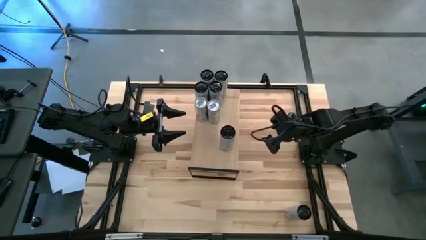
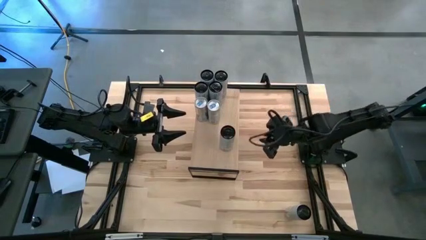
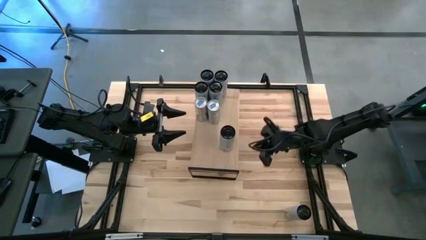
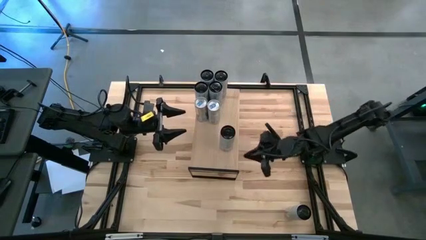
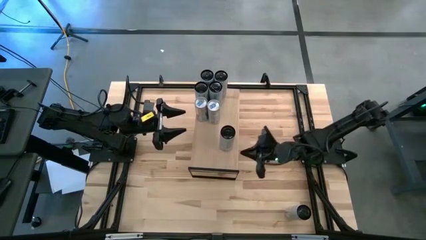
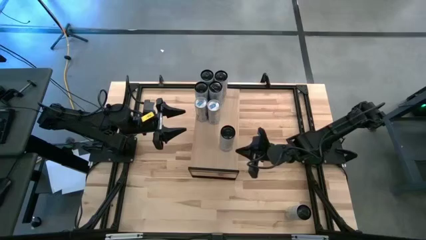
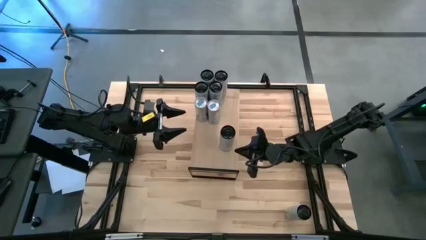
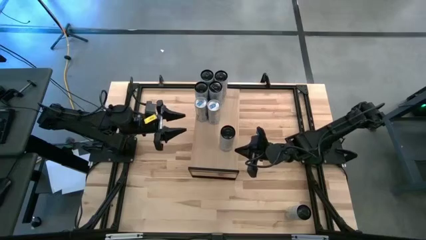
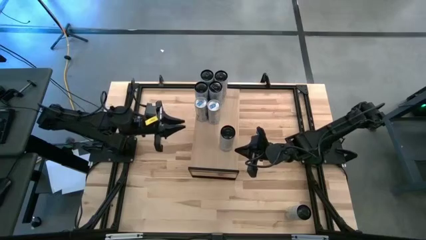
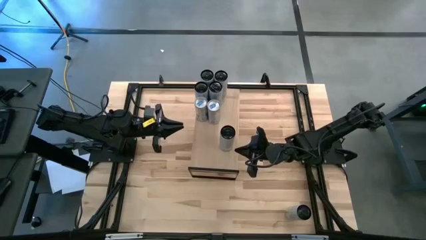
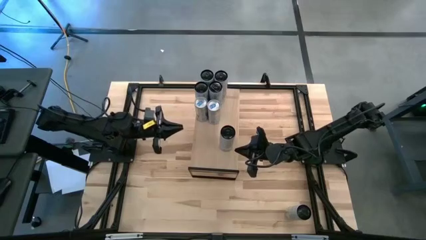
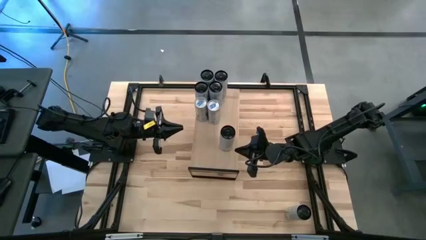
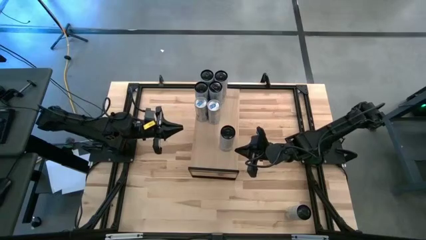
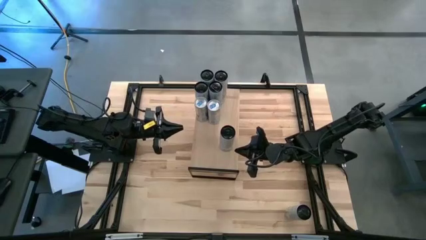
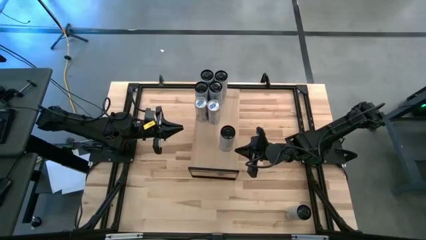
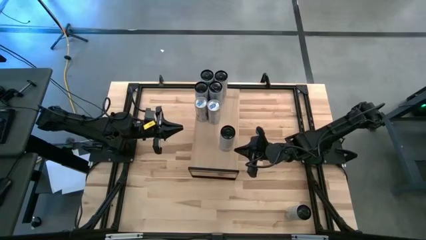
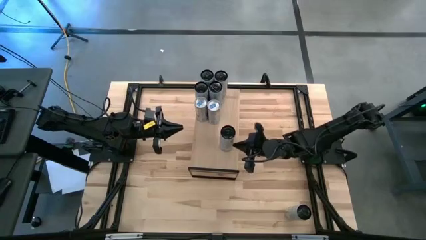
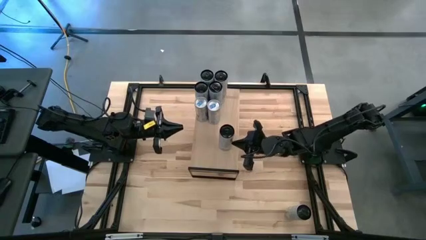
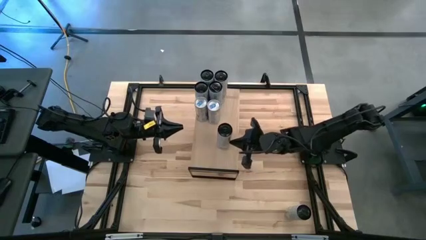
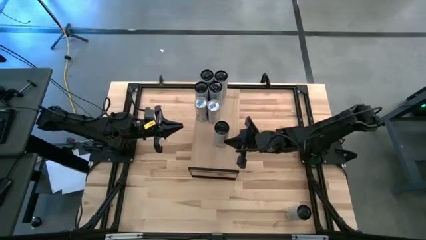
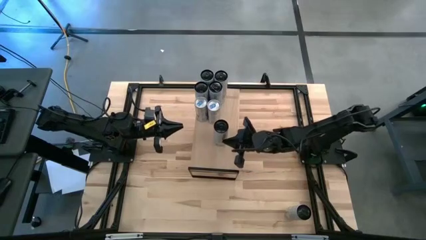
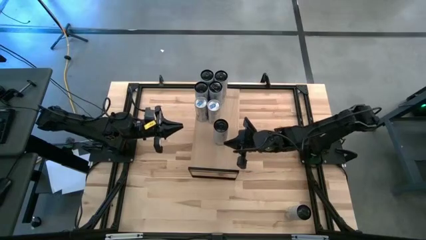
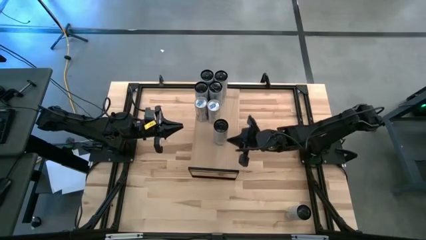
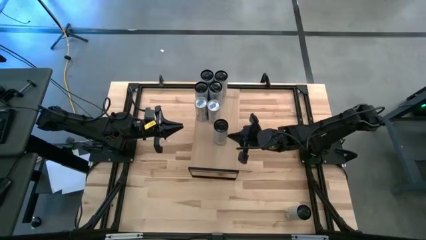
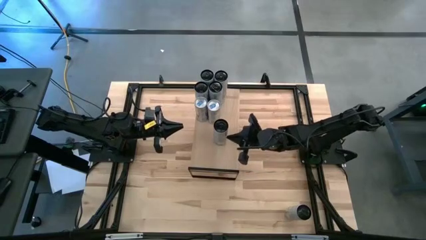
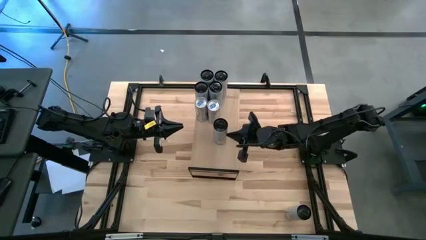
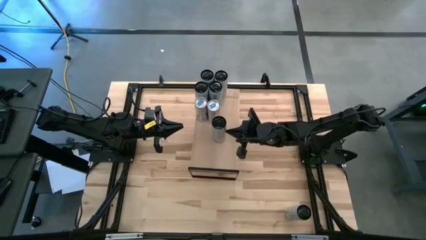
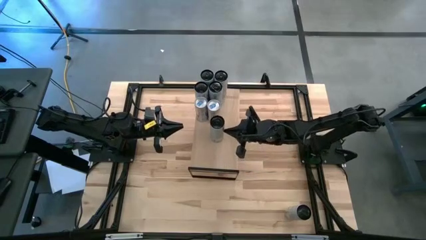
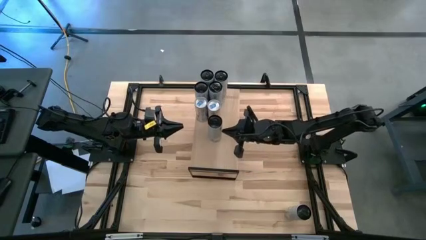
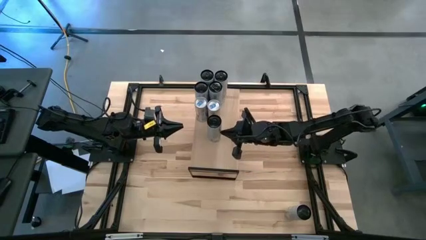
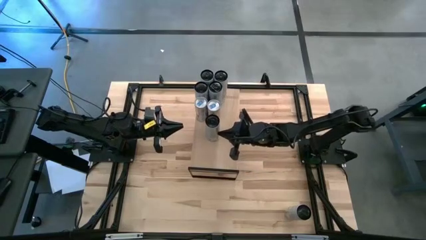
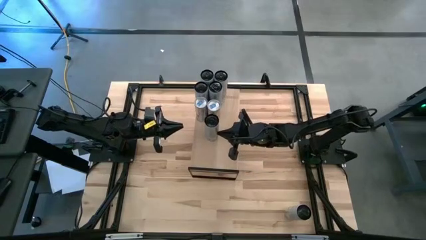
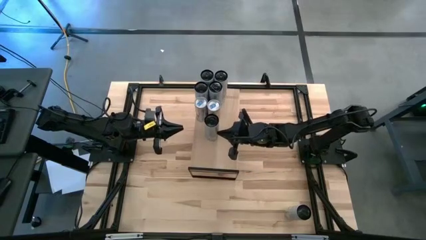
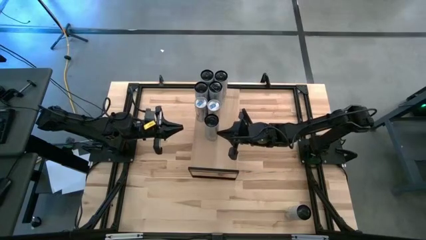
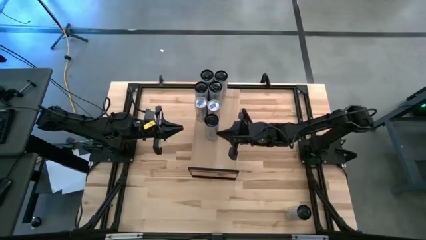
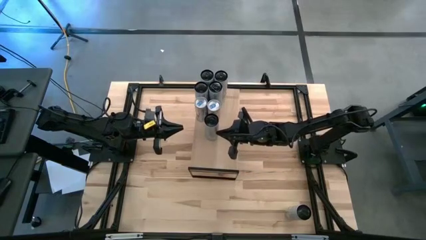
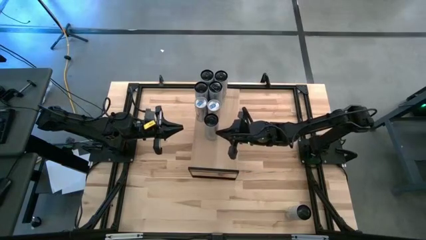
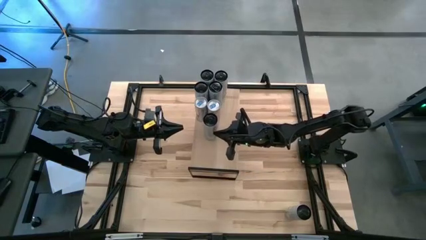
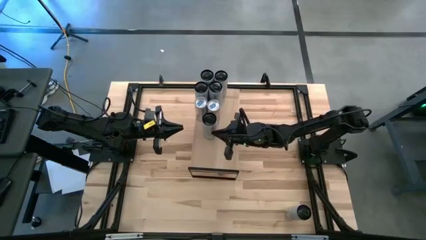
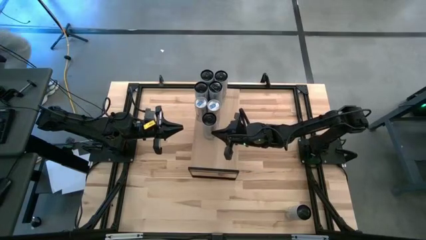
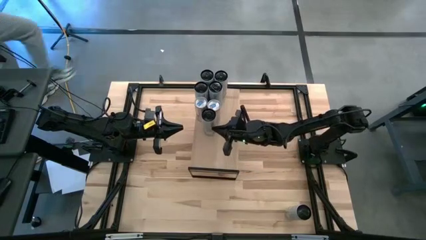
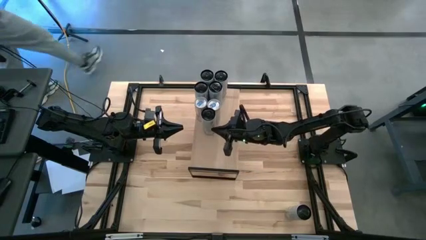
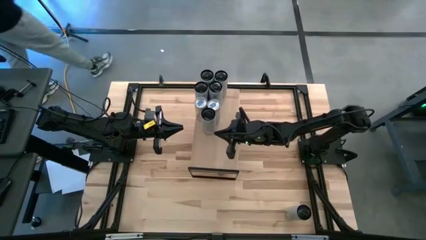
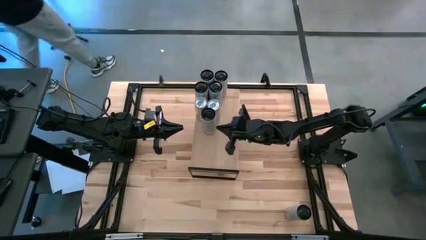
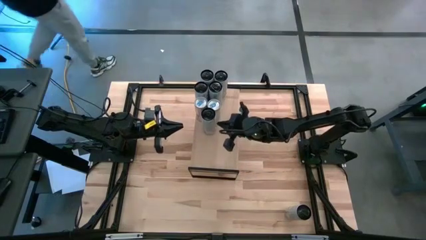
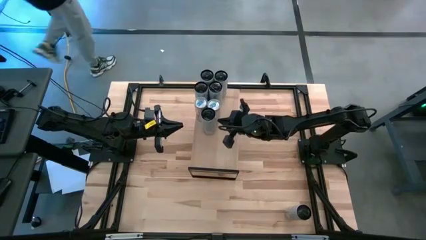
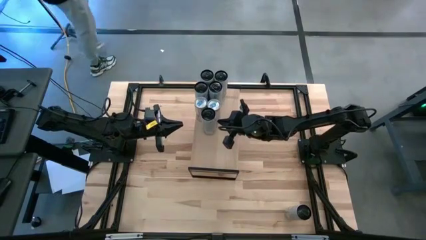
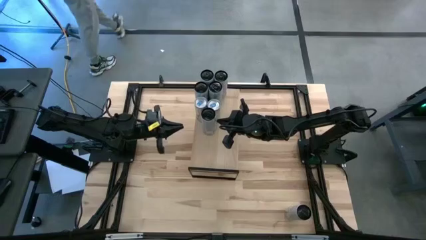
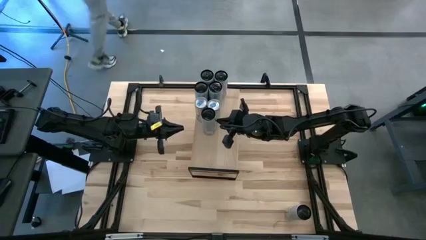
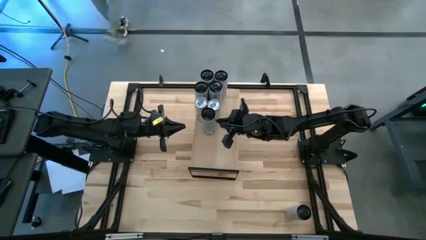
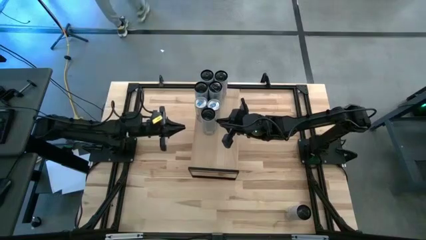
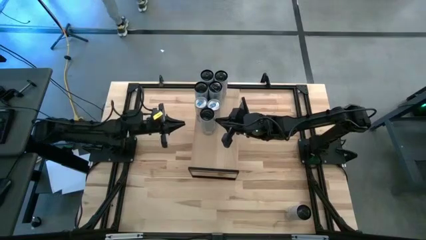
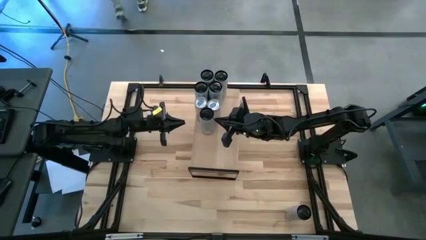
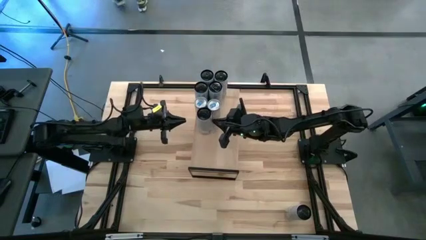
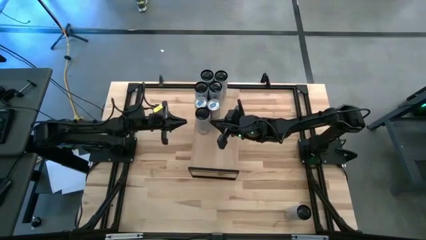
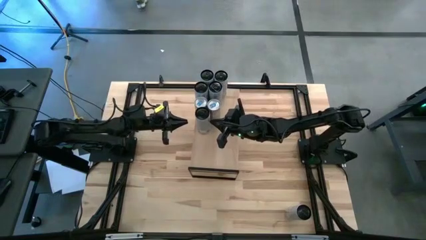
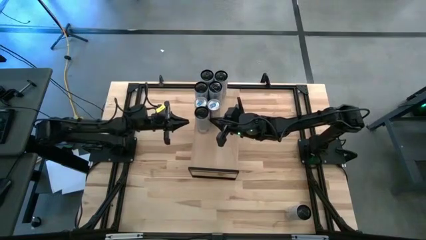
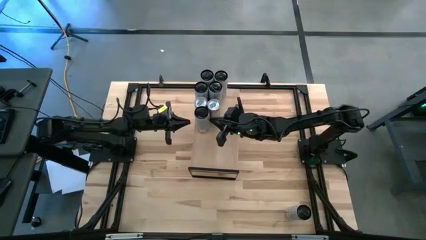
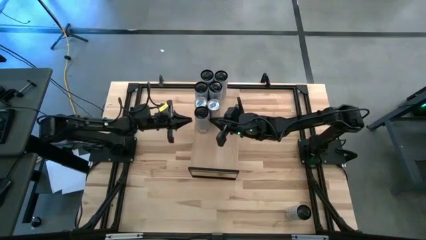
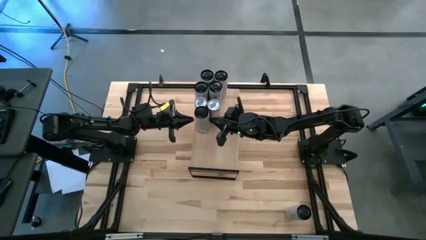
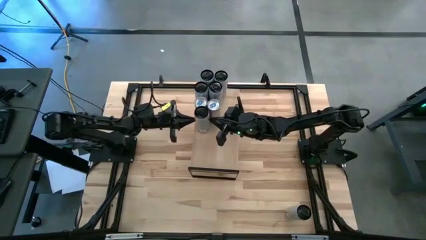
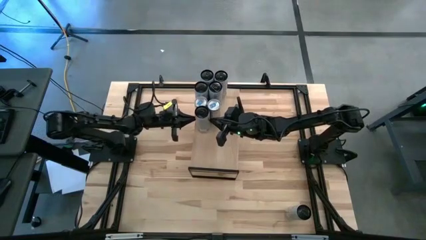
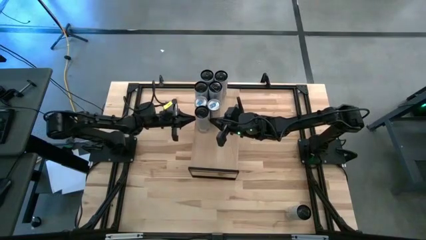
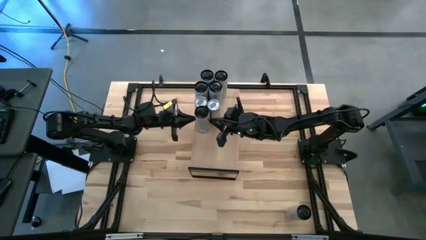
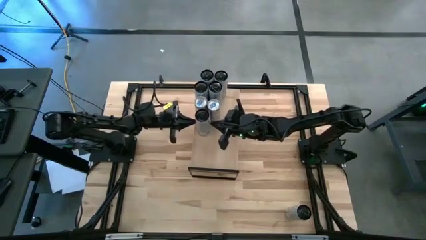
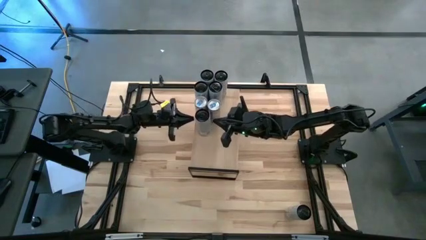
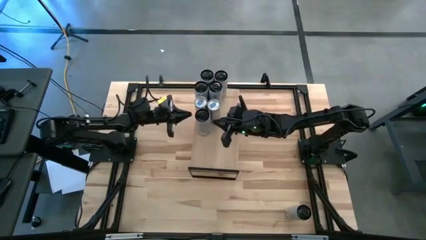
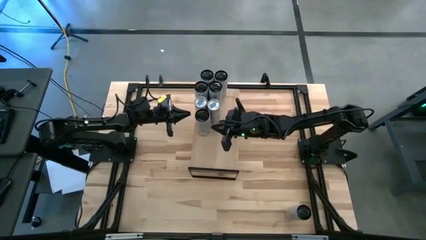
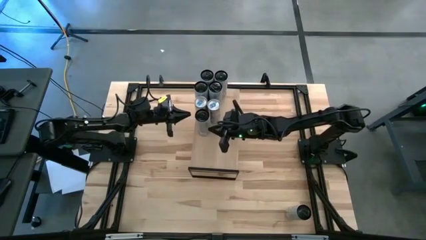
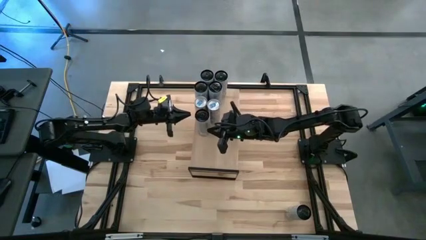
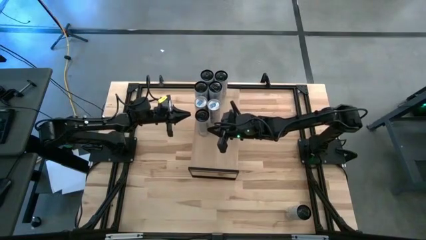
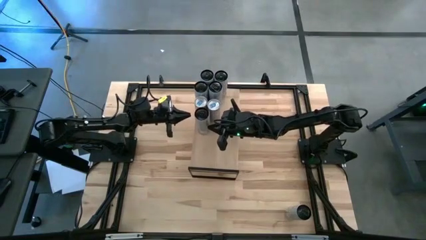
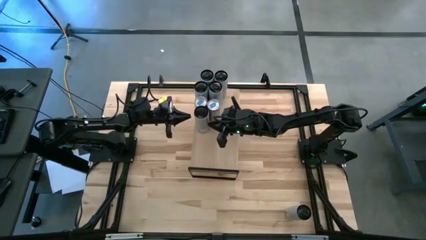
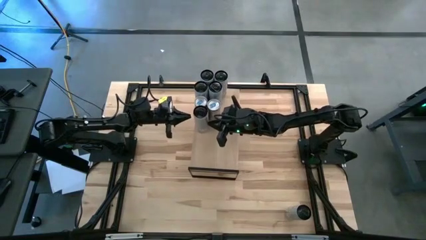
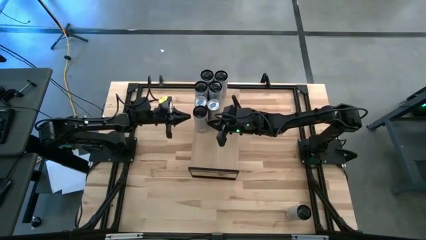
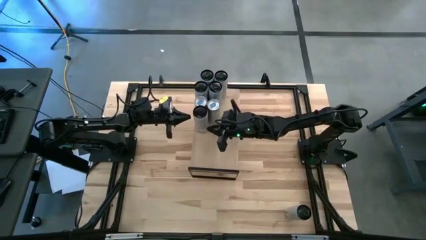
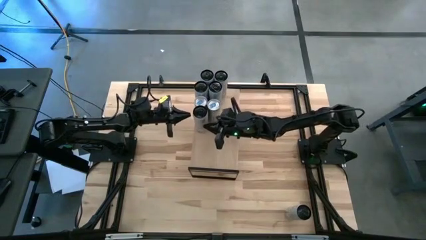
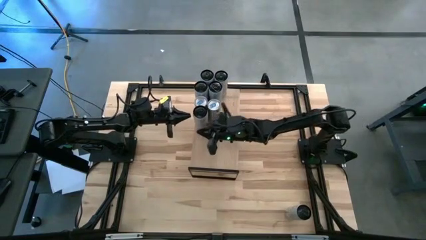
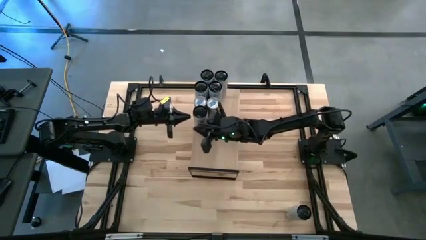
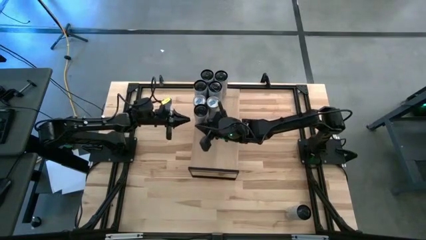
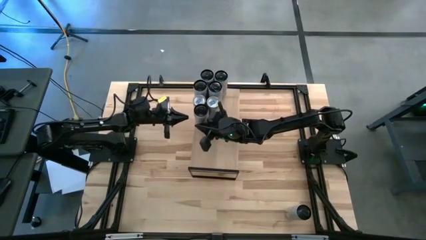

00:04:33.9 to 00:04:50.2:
Task: Place canned beverage on shelf
Put the top white yellow soda can on the shelf
